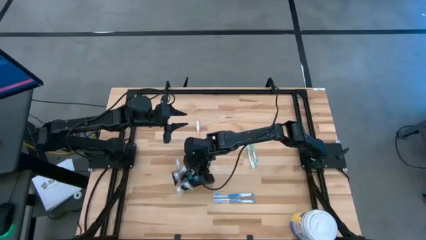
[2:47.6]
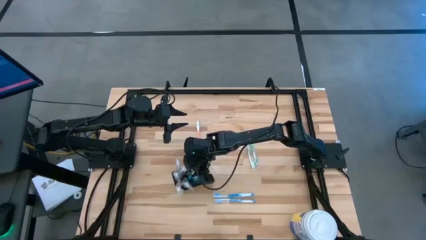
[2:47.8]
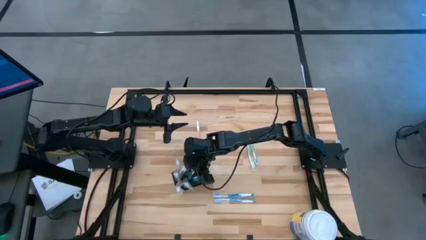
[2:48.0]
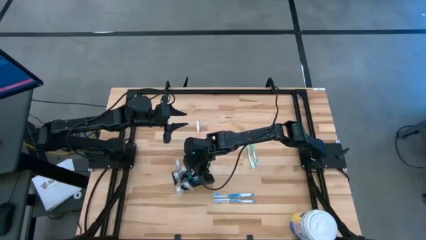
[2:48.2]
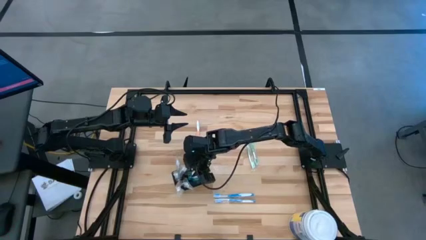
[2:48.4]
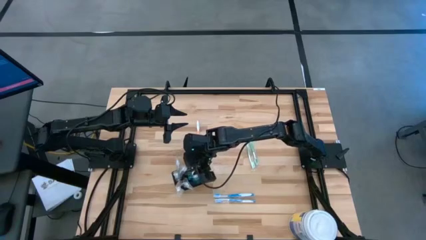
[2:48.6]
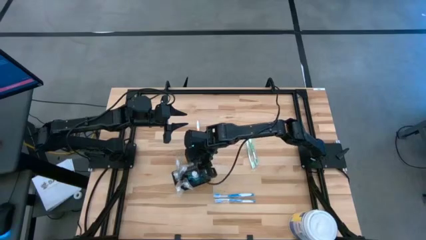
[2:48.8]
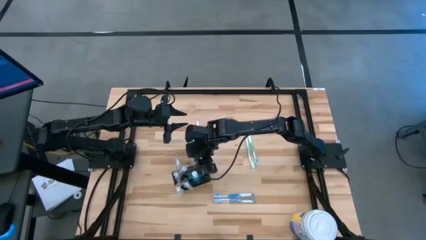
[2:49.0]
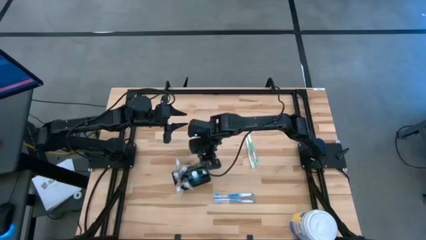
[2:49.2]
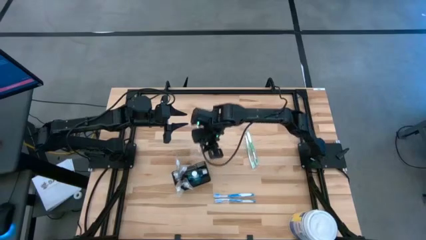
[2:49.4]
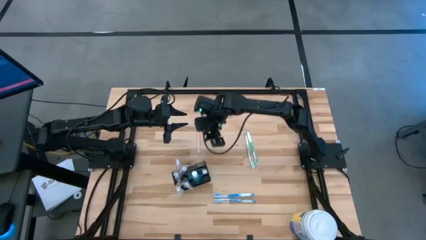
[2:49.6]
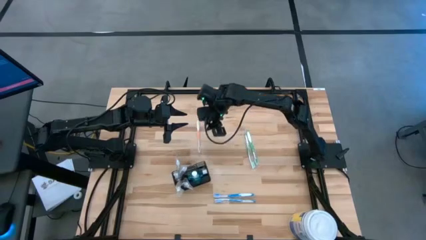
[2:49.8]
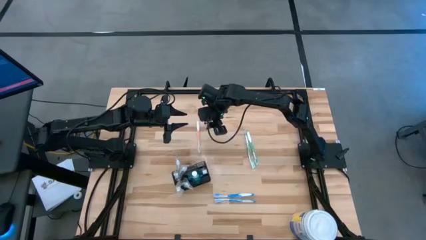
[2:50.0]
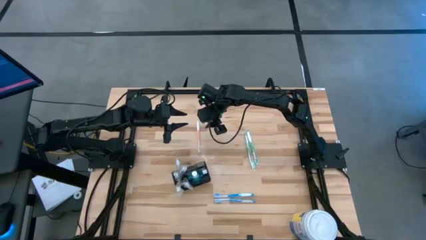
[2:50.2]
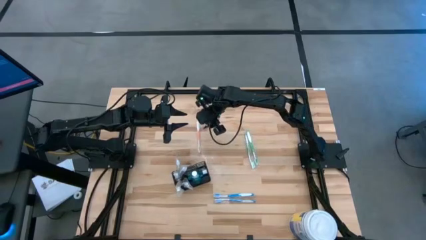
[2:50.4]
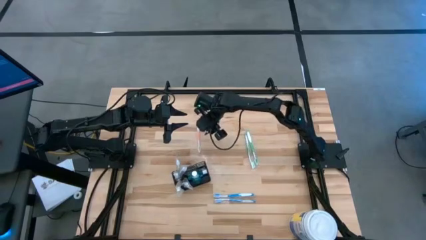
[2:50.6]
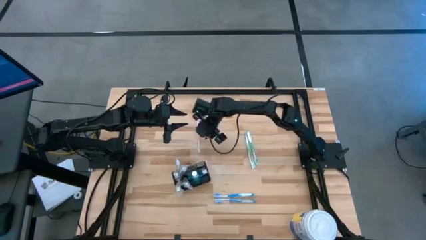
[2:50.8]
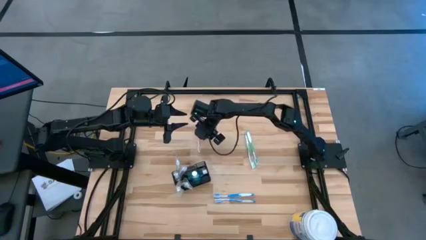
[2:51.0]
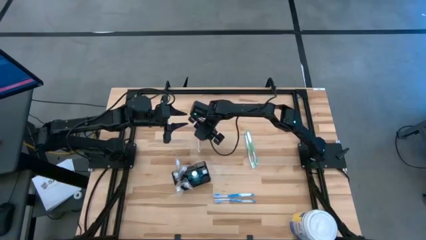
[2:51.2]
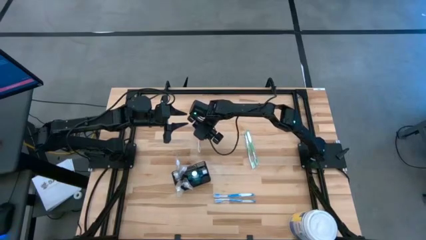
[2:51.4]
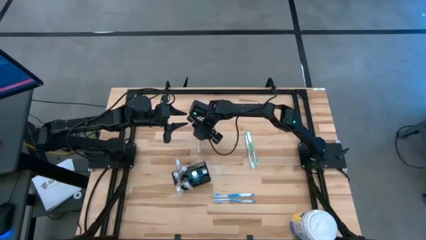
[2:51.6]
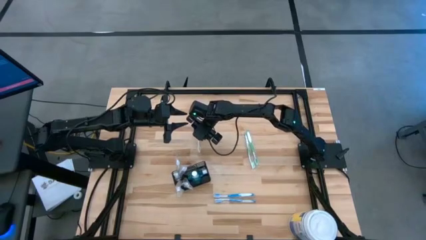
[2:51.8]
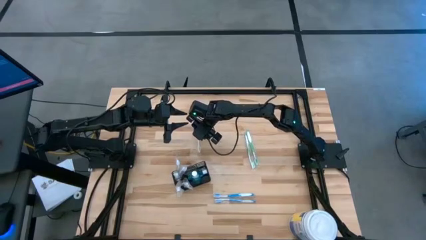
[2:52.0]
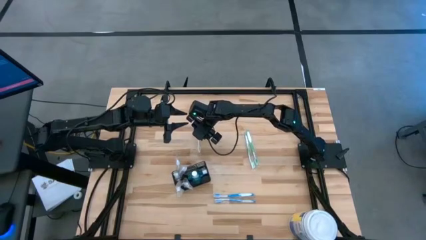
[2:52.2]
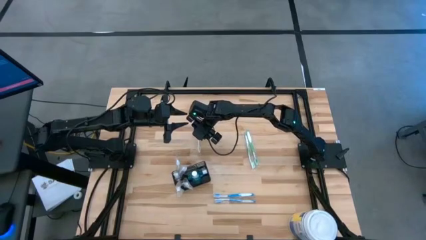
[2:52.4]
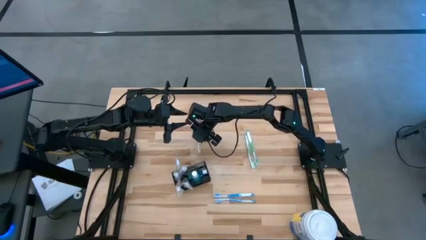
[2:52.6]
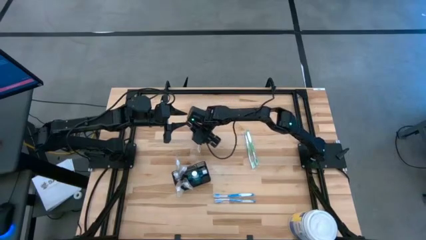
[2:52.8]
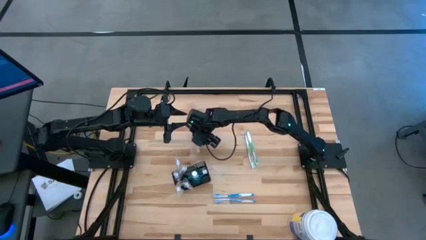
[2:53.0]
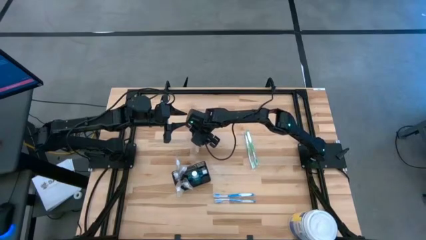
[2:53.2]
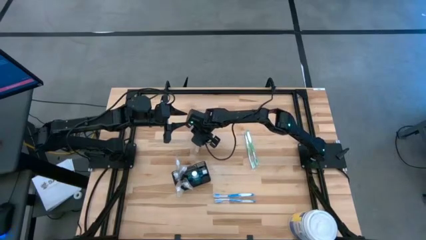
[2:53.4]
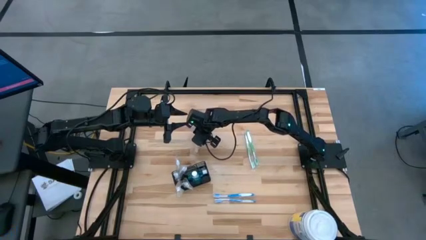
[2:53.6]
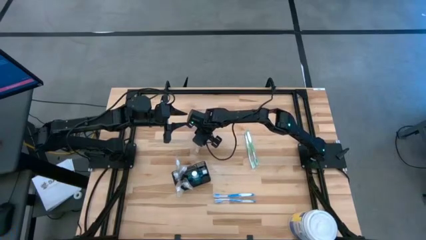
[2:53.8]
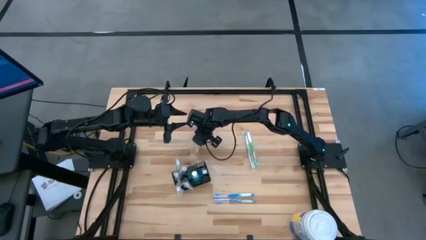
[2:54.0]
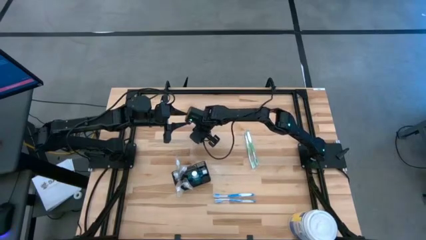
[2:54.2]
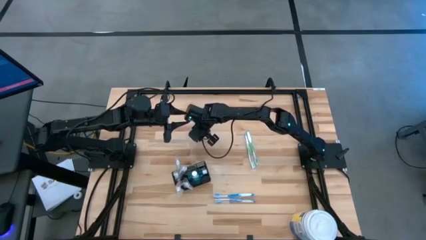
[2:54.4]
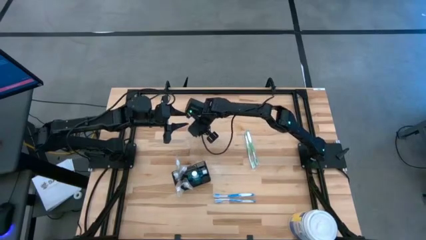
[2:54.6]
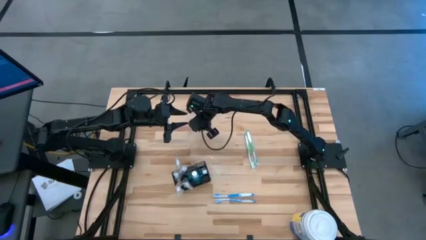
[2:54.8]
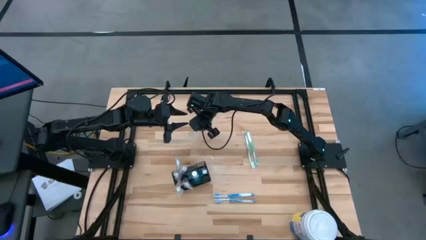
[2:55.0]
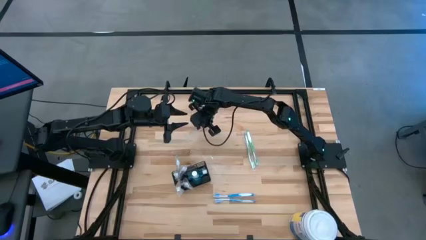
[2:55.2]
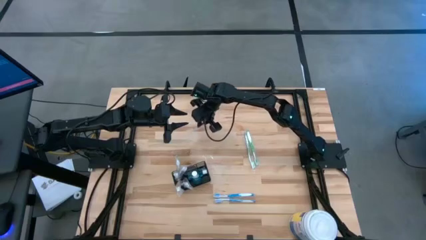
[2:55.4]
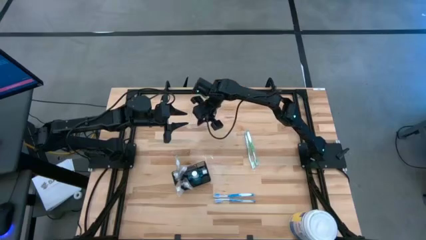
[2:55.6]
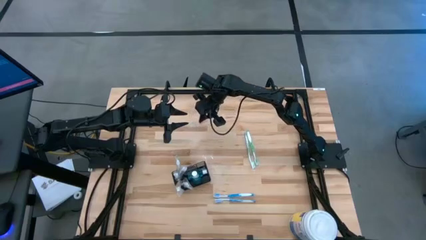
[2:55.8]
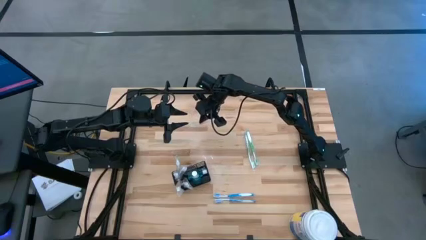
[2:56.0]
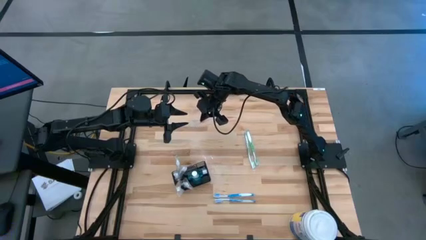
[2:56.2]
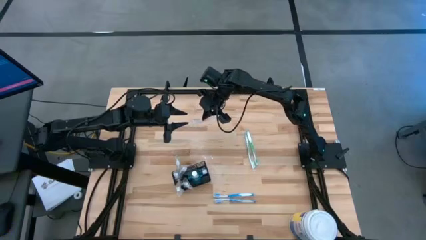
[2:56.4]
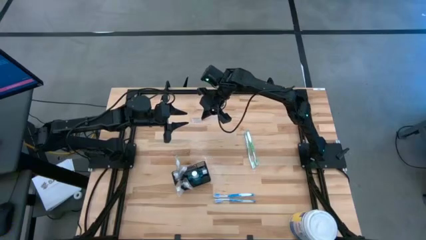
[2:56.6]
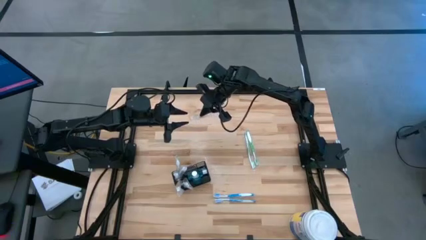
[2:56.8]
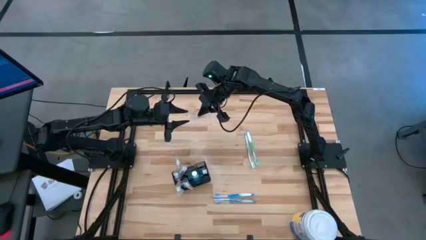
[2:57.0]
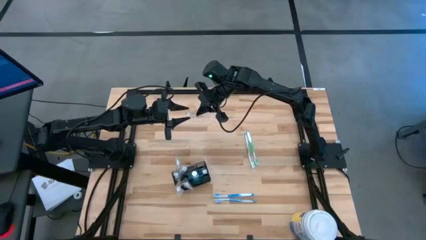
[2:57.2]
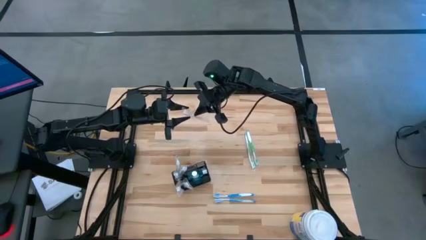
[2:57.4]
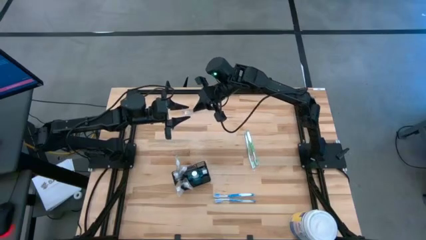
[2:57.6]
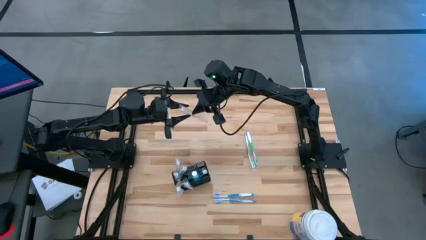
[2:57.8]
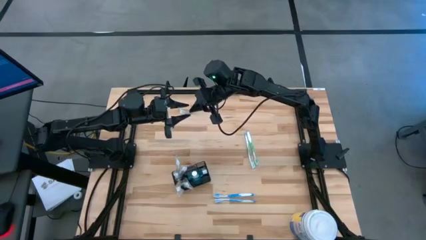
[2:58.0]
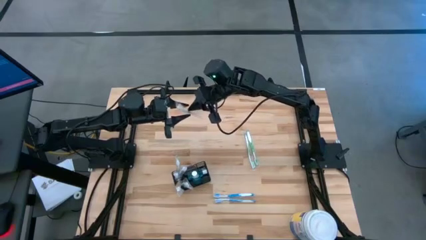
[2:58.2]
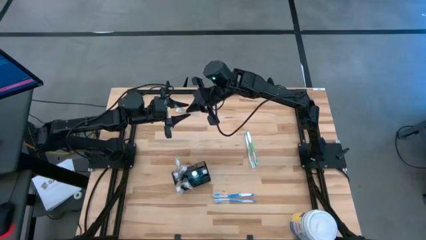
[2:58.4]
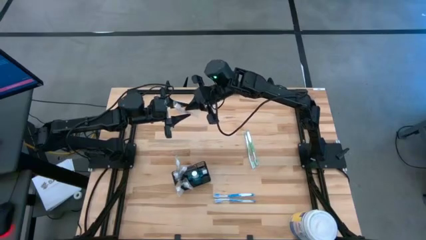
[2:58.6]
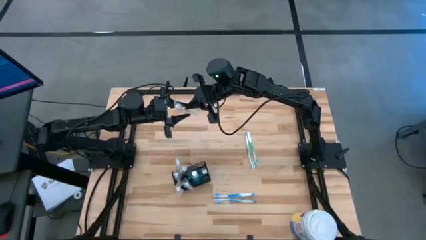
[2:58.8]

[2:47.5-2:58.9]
Task: Pick & Place toothbrushing station
Put the white orange toothbrush into the black toothbrush rack

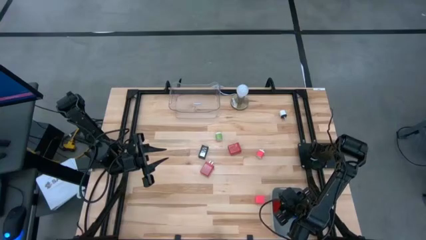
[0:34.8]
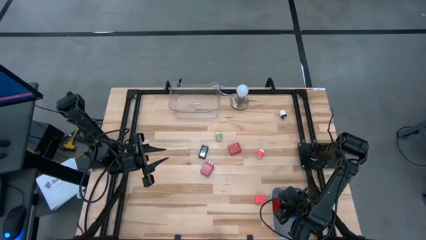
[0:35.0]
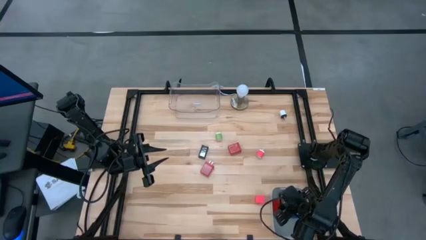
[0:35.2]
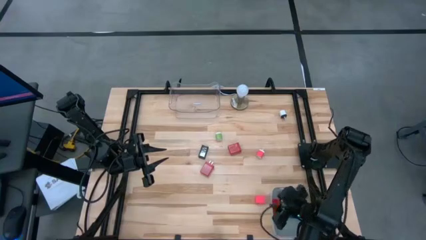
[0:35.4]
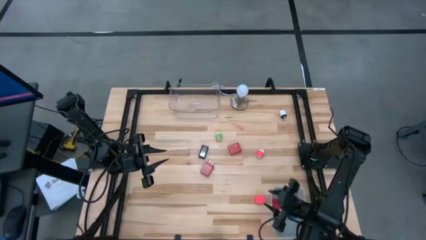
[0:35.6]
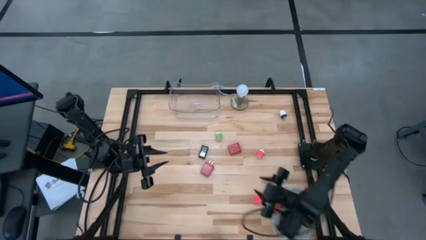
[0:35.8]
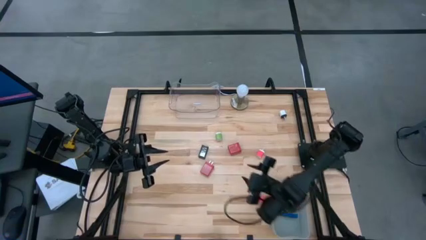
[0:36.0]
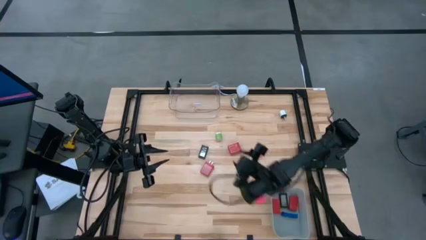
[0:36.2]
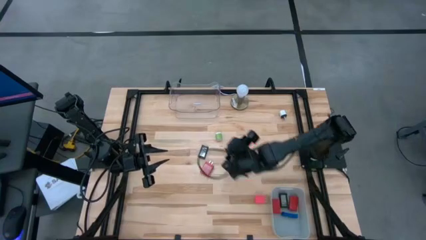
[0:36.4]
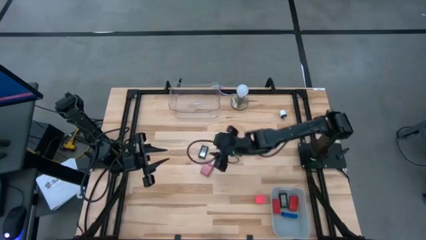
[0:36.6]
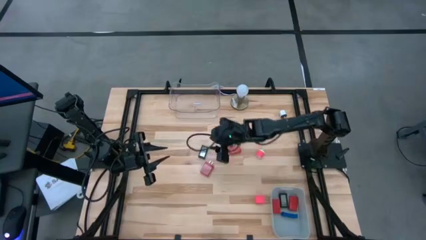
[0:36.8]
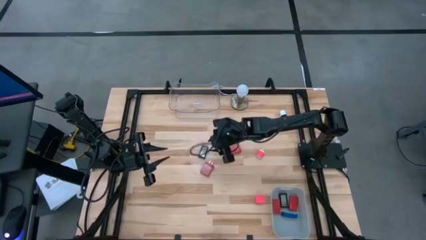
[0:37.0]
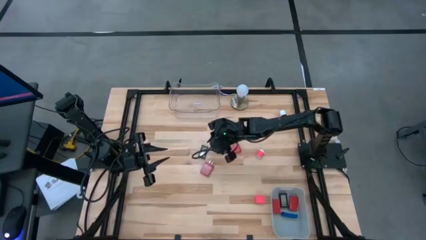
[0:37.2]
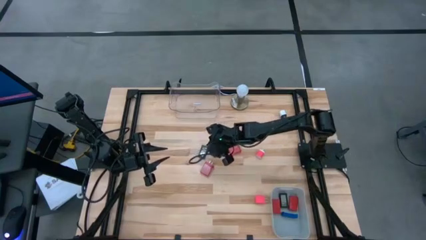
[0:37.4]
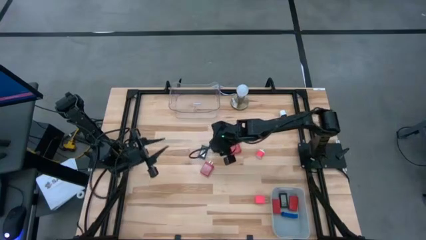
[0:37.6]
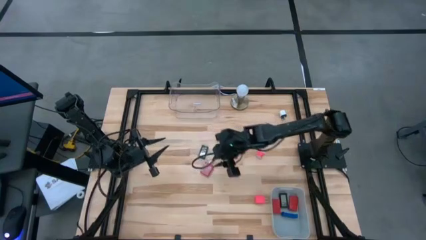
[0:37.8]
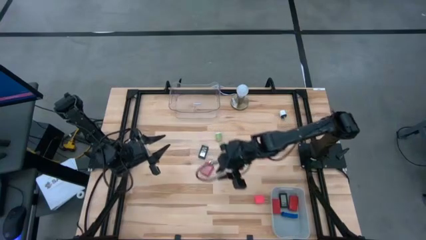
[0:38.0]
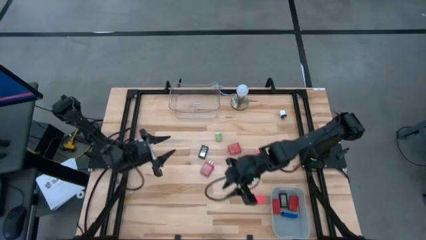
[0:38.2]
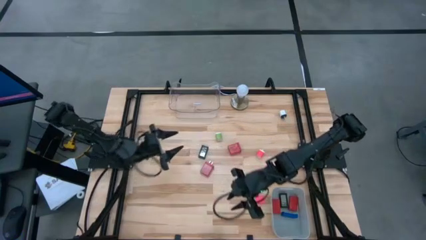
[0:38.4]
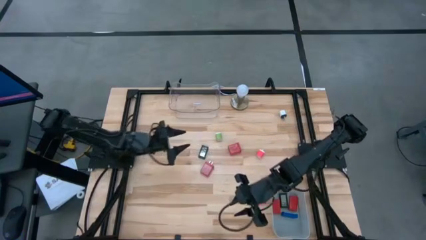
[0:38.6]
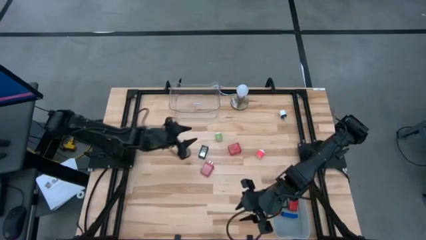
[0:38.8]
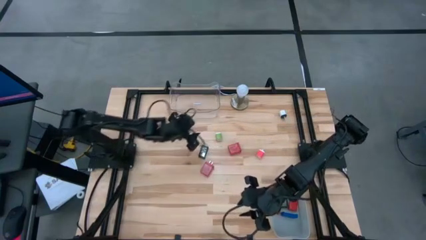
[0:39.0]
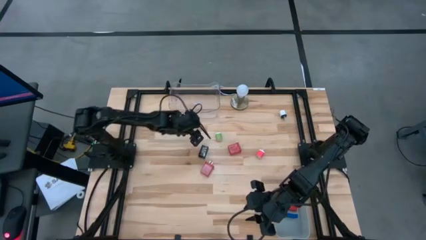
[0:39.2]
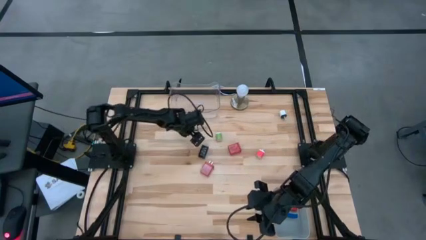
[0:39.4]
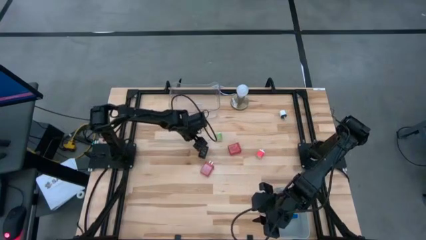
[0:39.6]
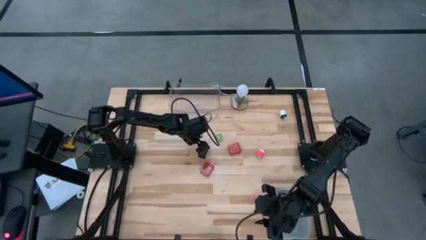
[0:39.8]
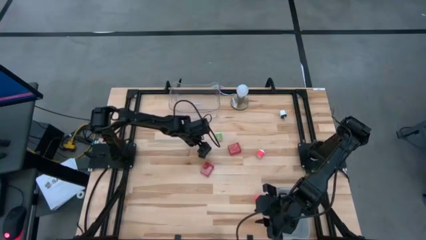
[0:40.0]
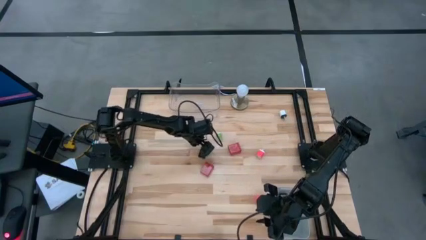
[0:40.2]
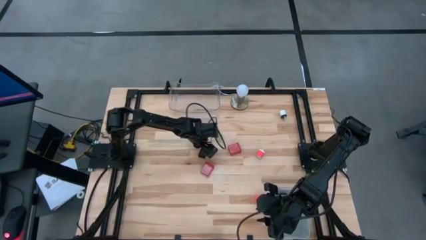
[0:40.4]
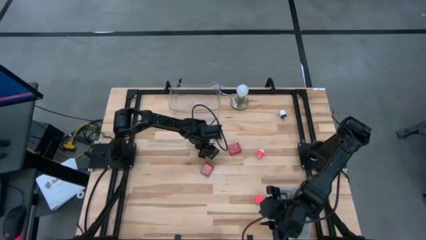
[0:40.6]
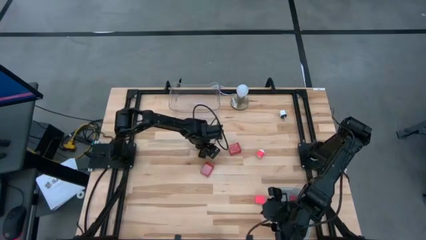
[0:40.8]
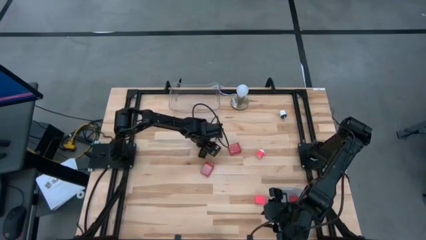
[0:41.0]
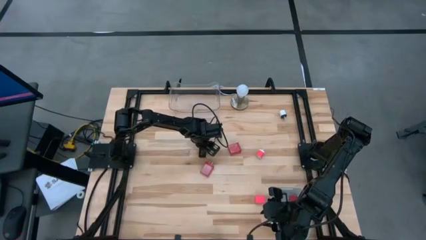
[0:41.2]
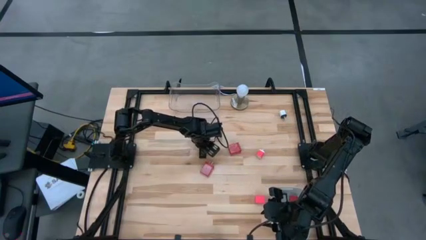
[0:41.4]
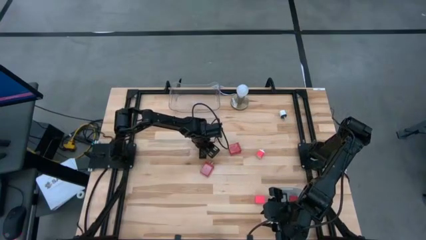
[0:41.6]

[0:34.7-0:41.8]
Task: Pick & Place Office items
Put the black digital clock into the gray bin
